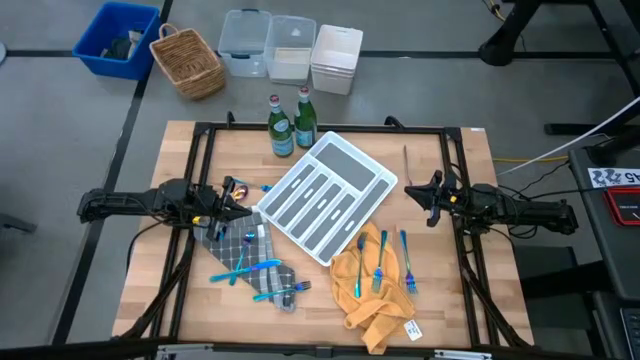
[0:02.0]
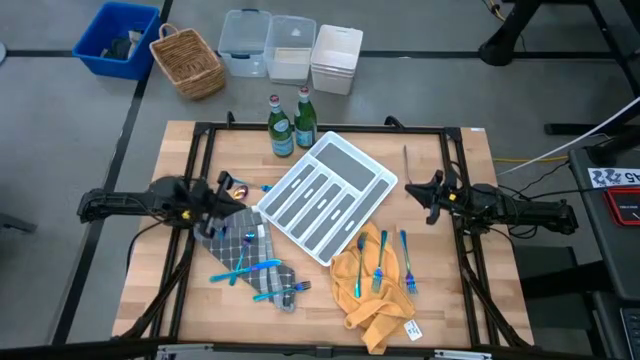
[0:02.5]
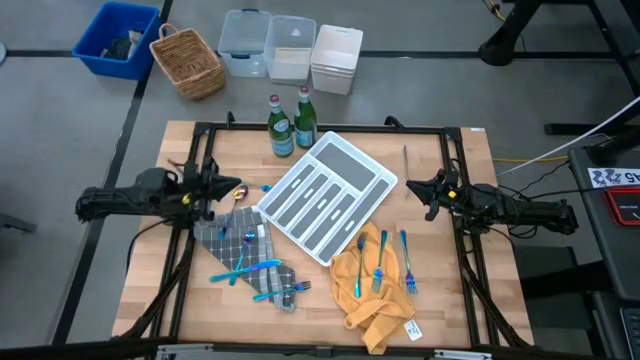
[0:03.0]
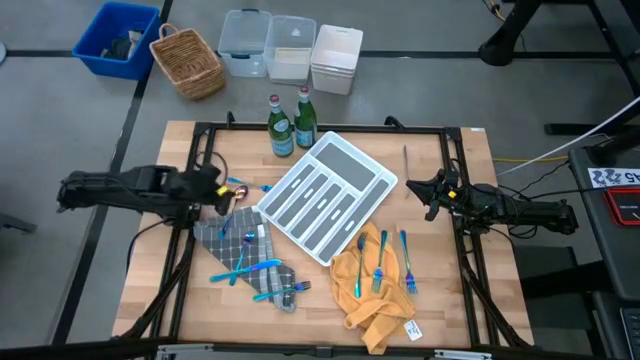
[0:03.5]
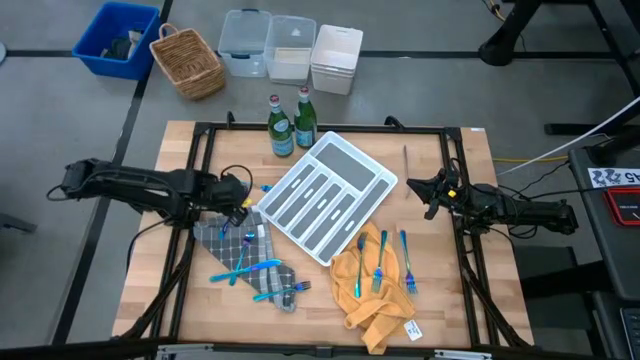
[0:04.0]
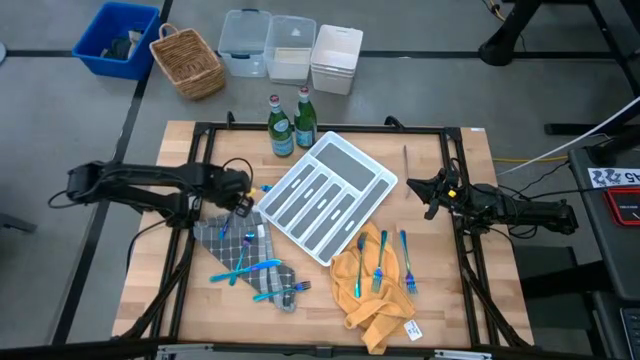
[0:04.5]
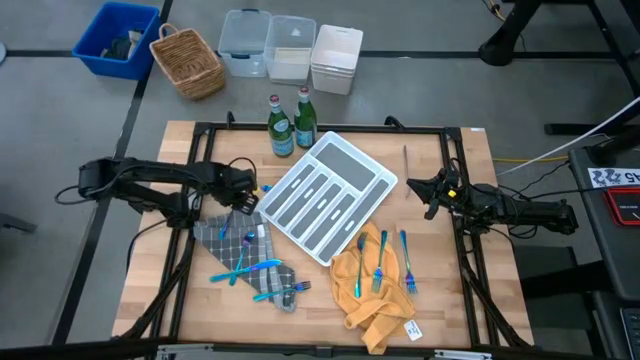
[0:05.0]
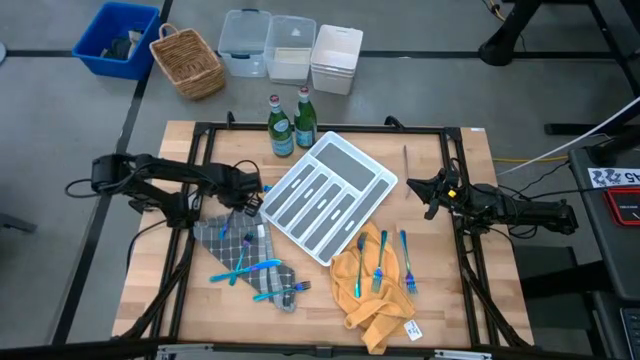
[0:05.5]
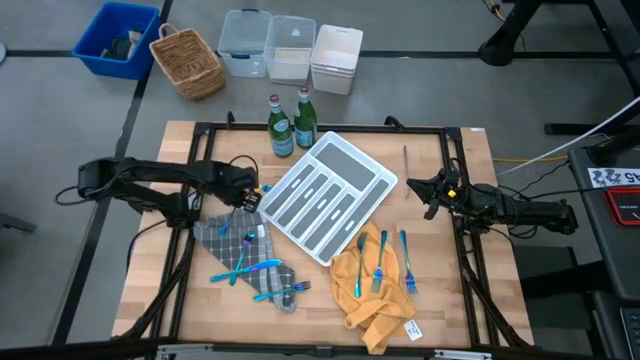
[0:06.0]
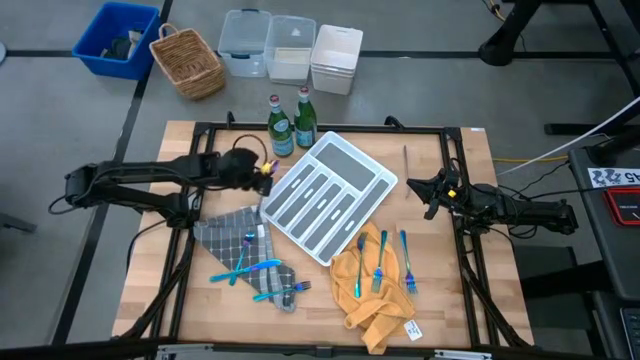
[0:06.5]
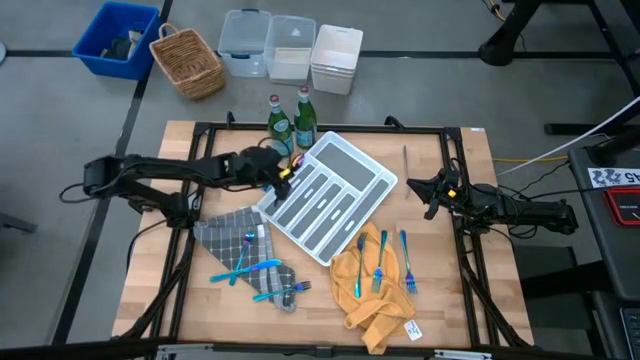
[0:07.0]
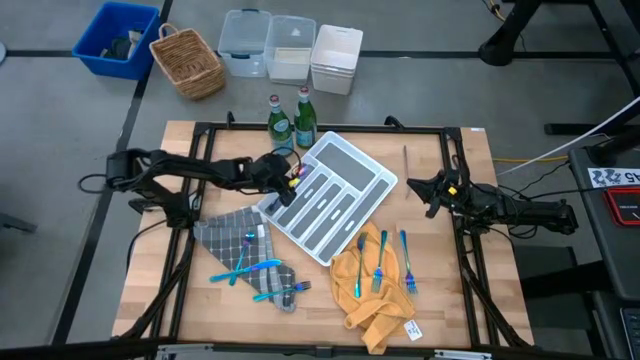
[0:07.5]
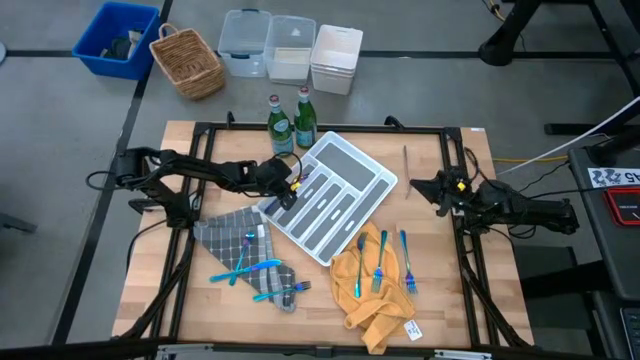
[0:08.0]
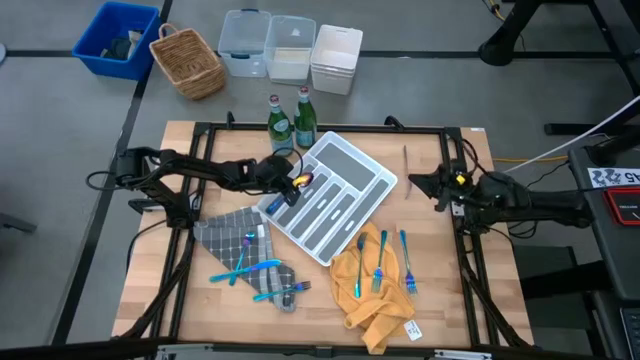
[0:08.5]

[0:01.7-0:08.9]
Put the blue spoon into the cutlery tray

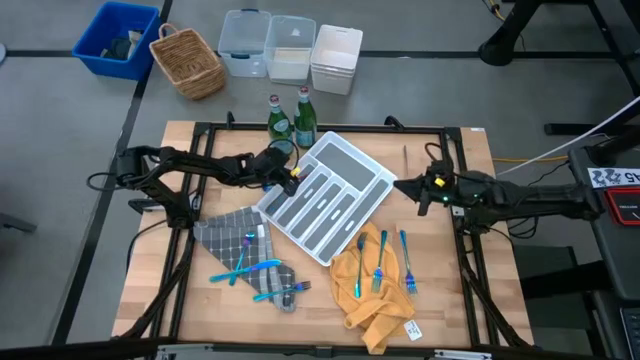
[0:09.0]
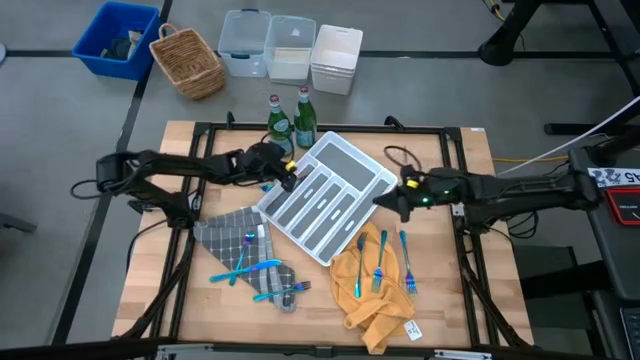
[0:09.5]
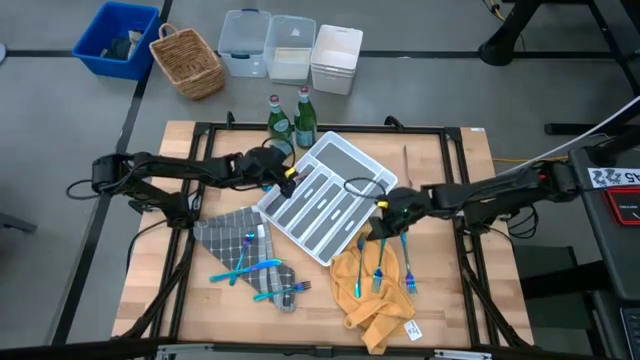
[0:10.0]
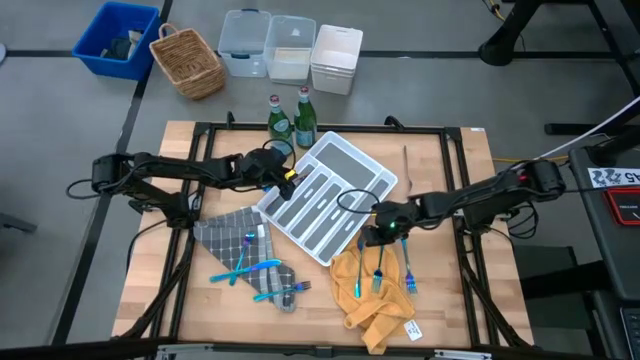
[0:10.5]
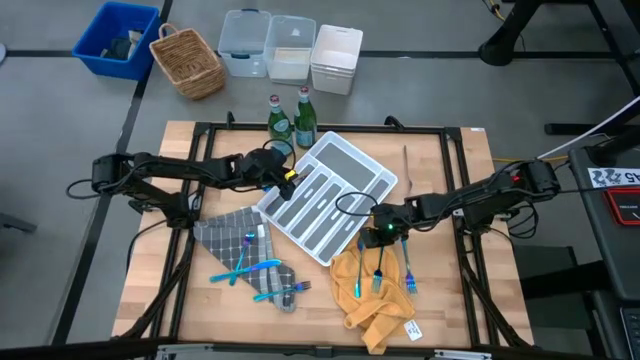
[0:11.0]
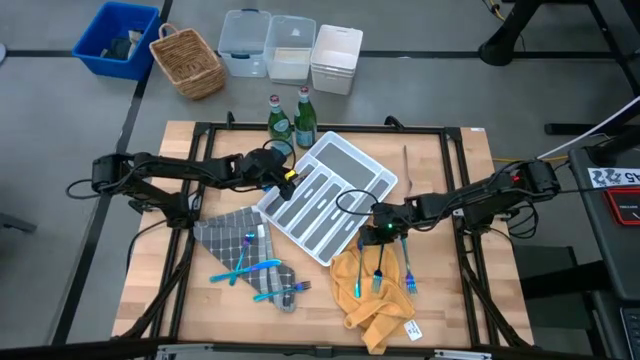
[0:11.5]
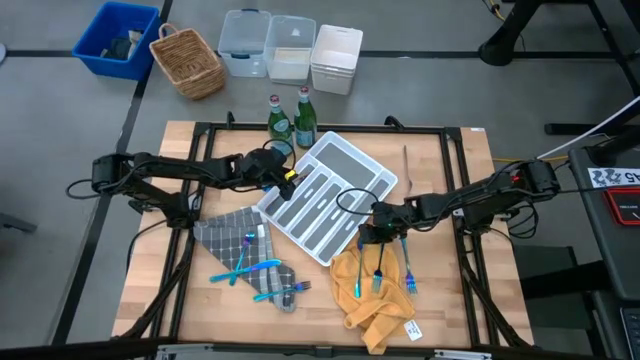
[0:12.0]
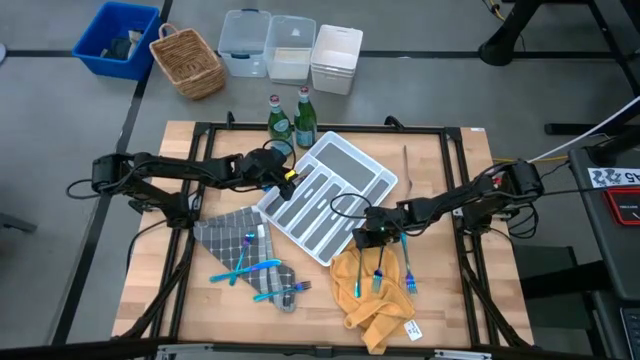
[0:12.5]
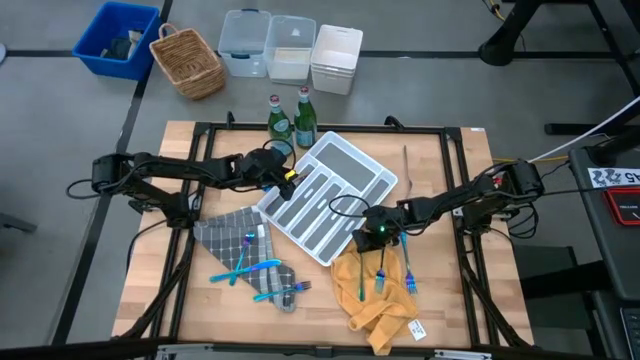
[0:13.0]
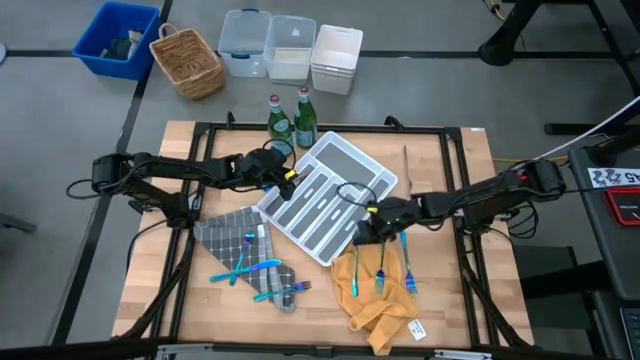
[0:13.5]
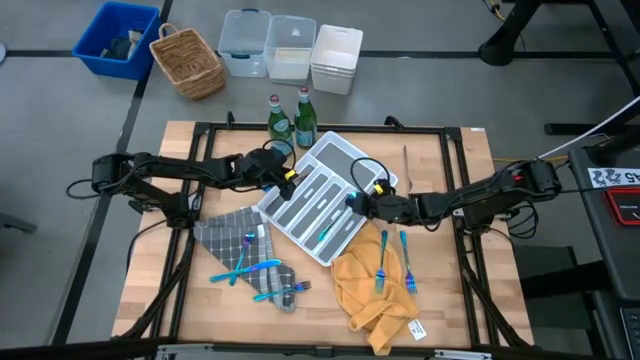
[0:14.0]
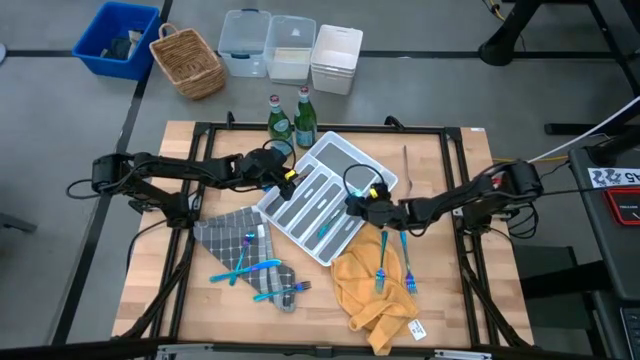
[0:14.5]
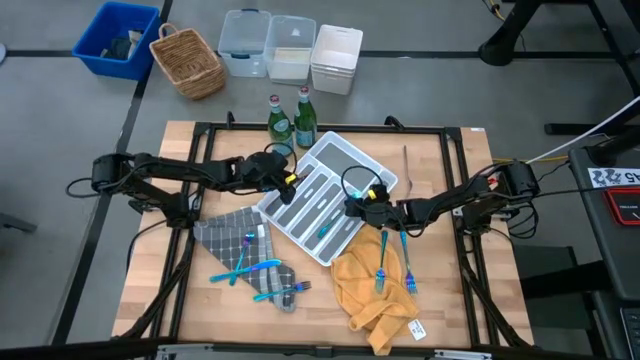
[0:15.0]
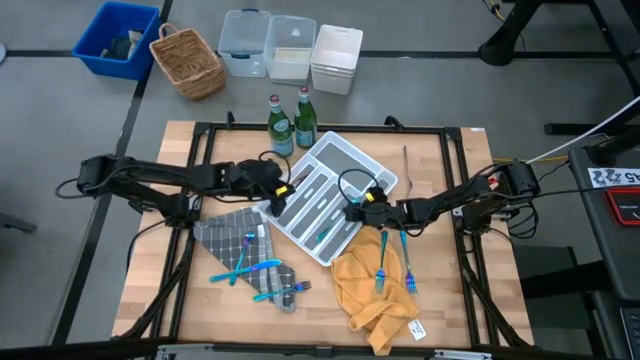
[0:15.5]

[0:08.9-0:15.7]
Put the blue fork into the cutlery tray

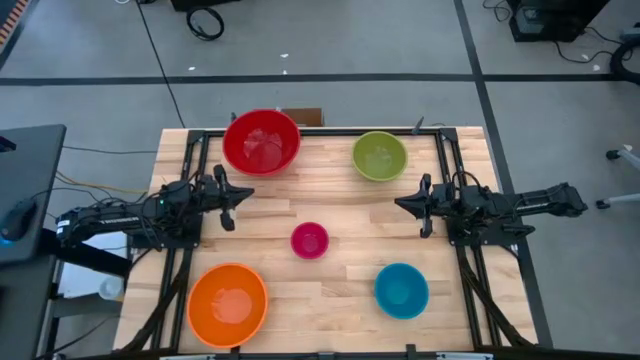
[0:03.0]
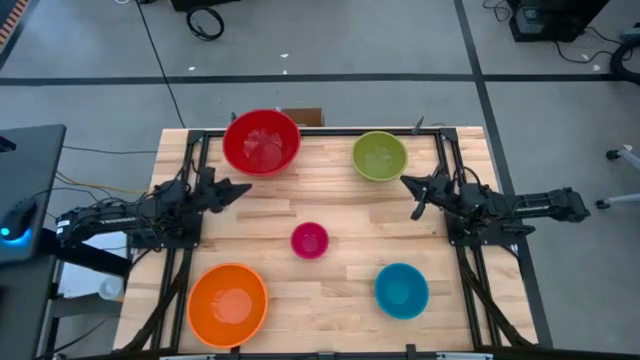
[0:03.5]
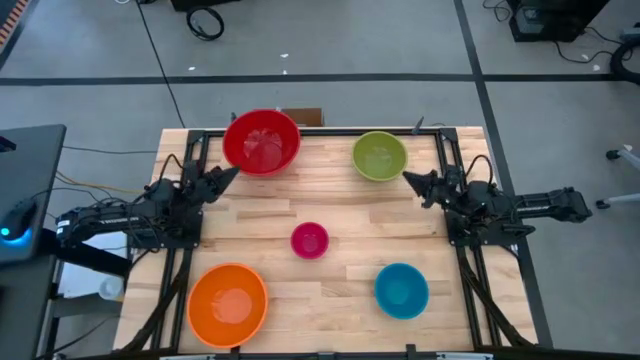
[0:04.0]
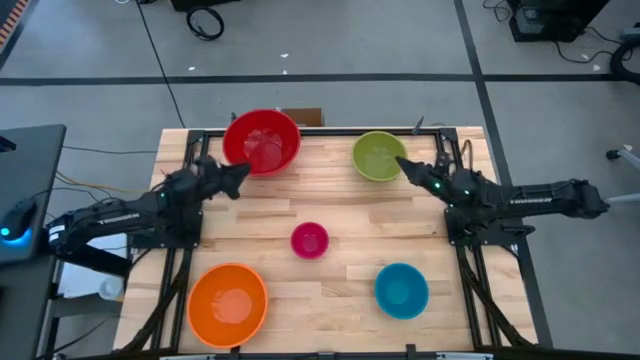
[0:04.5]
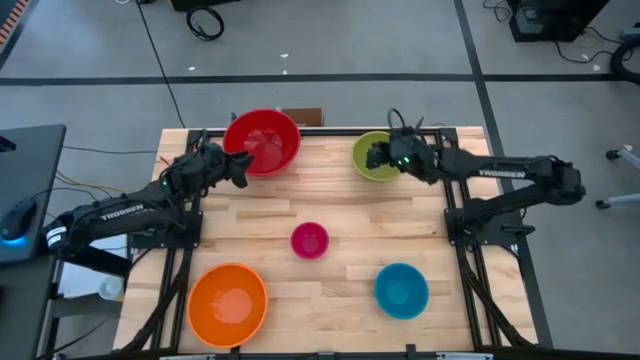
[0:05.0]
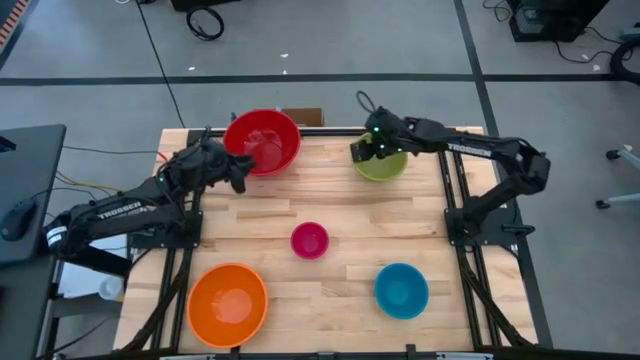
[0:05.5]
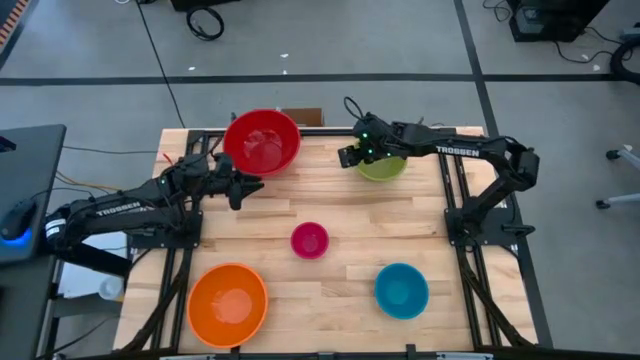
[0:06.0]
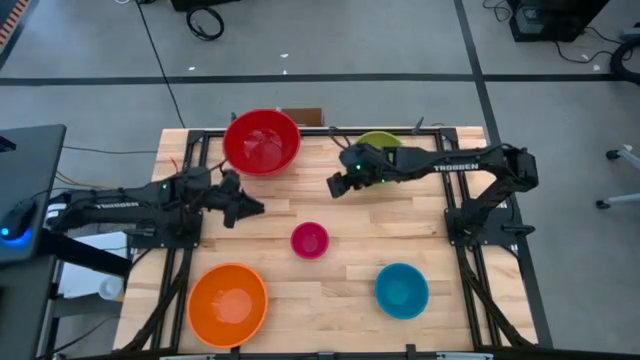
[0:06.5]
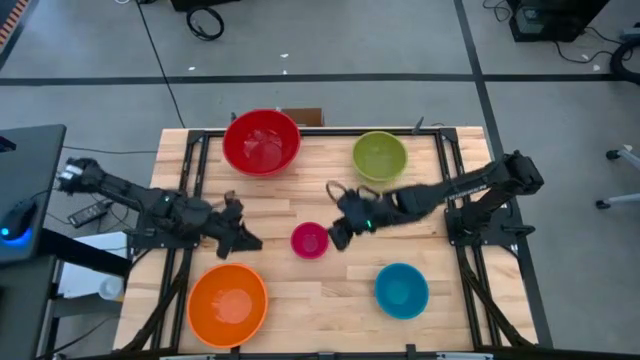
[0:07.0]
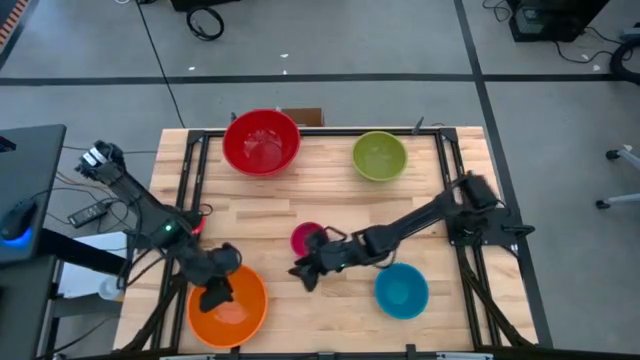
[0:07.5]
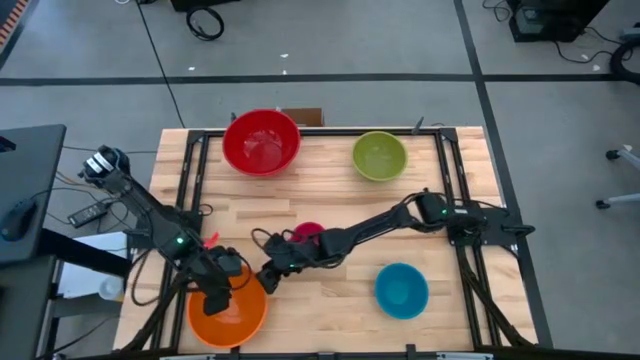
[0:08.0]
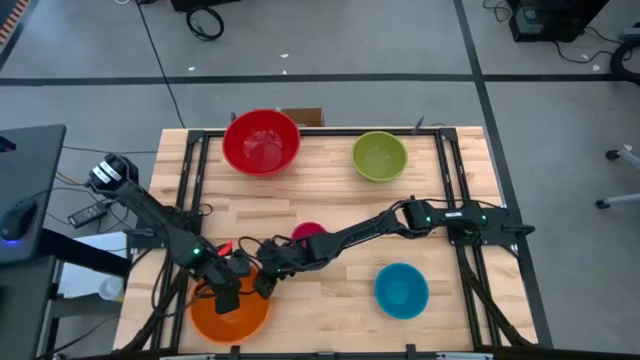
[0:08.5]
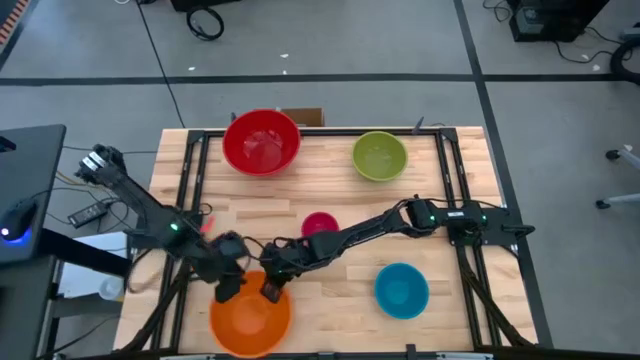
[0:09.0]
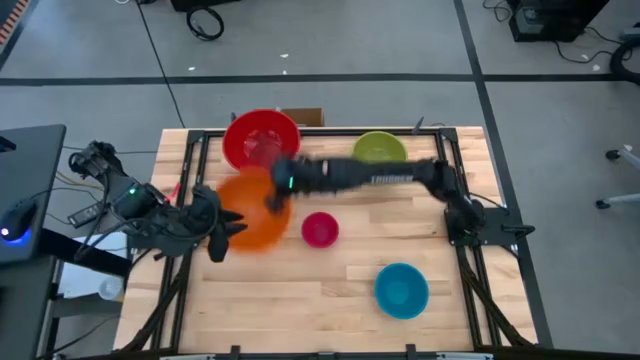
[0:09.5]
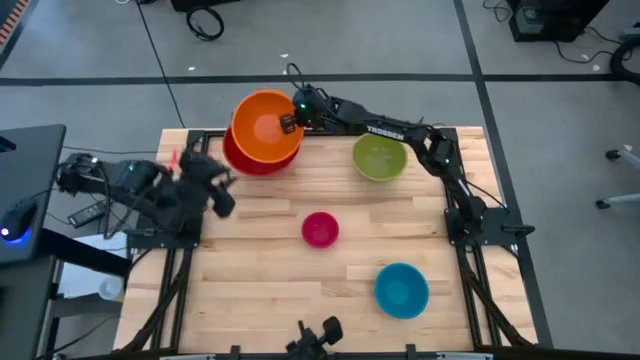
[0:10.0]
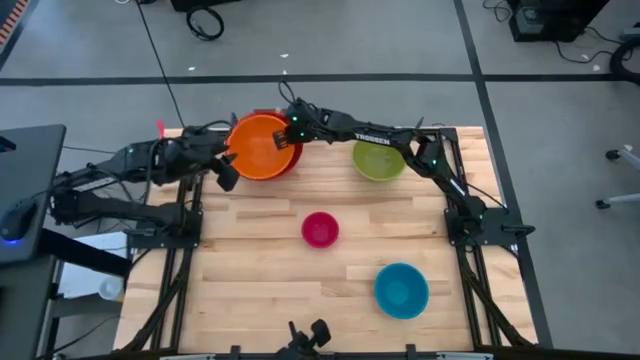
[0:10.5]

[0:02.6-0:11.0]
Stack the orange bowl on top of the red bowl
